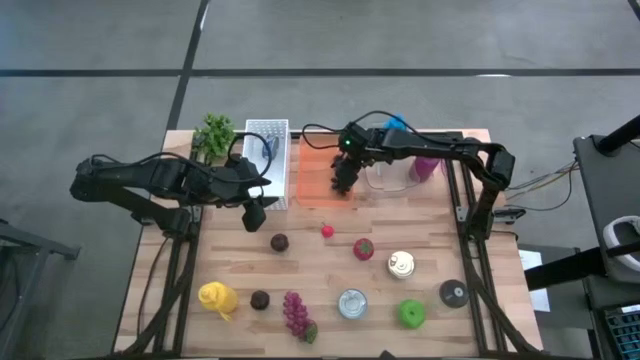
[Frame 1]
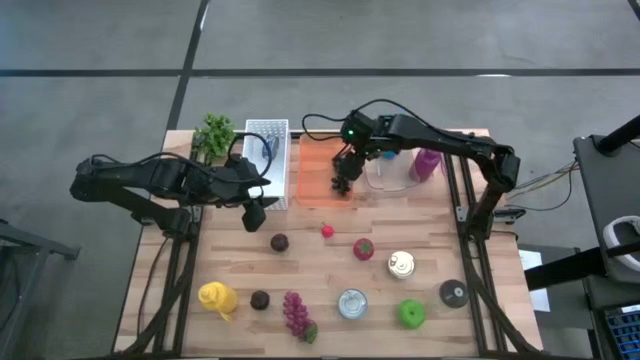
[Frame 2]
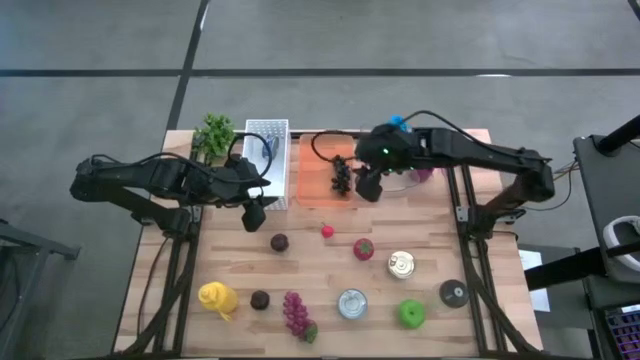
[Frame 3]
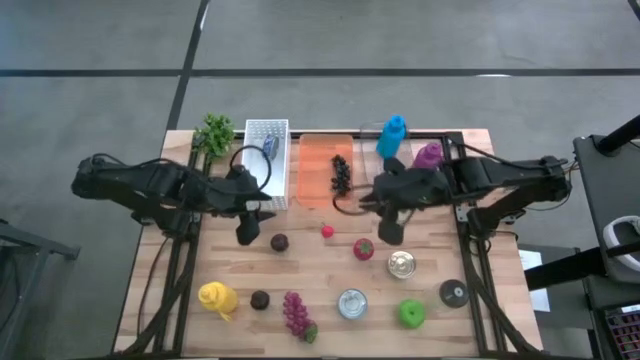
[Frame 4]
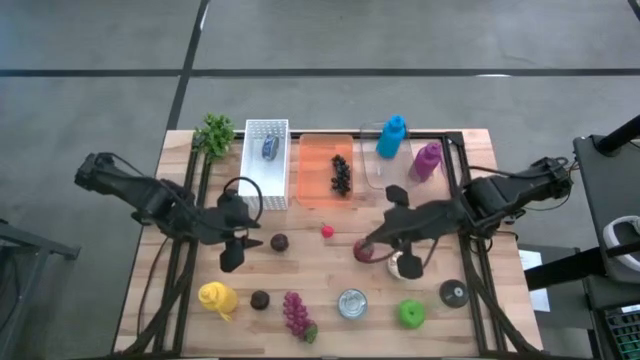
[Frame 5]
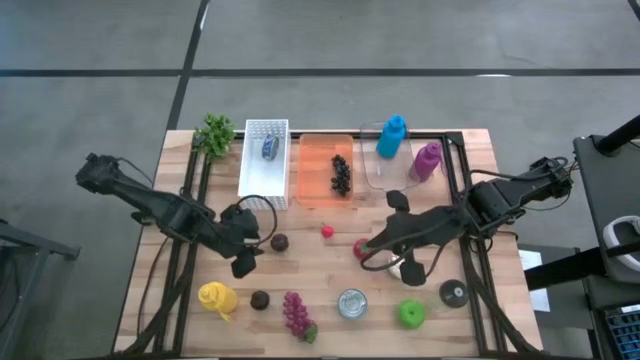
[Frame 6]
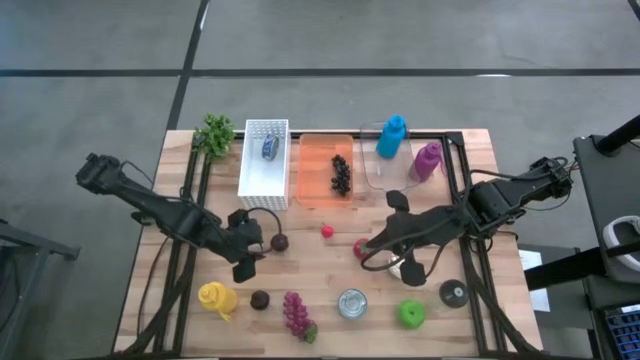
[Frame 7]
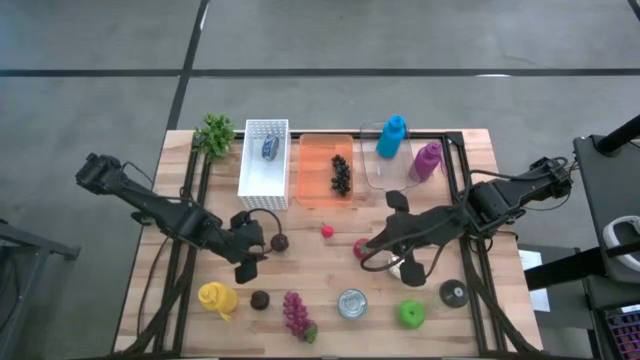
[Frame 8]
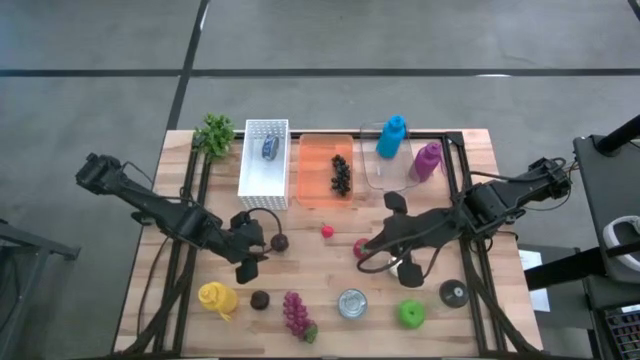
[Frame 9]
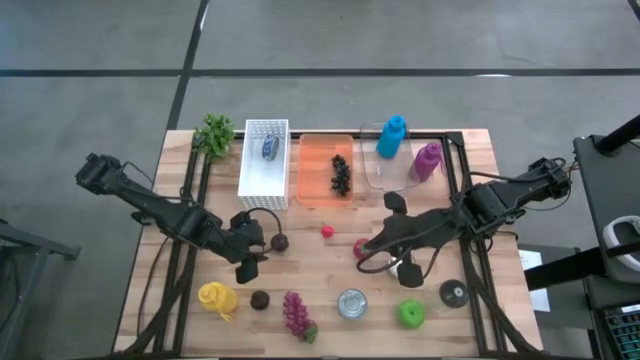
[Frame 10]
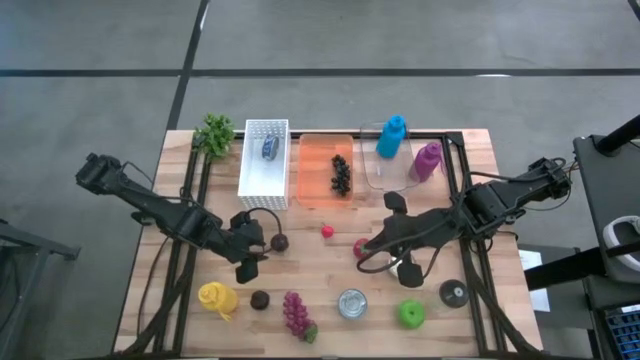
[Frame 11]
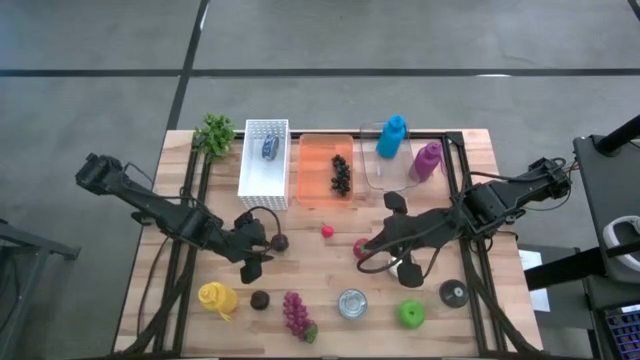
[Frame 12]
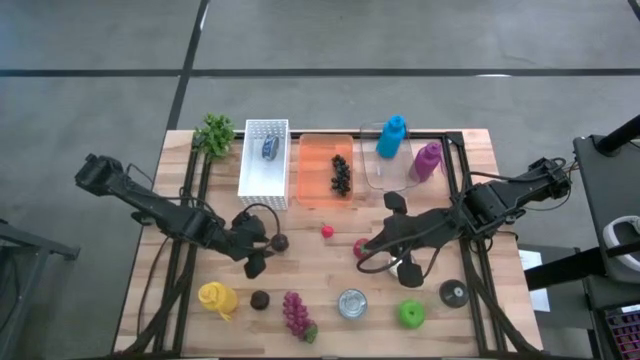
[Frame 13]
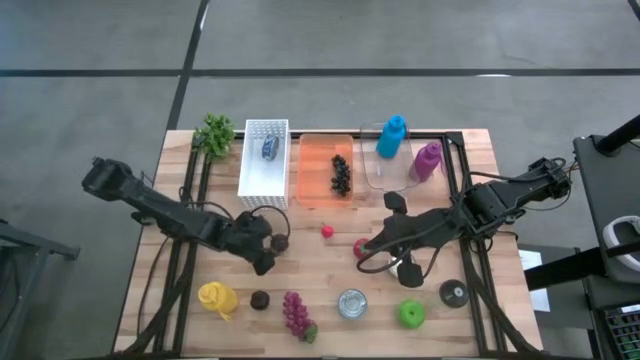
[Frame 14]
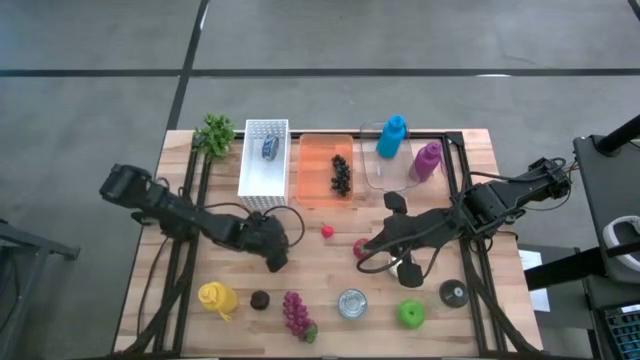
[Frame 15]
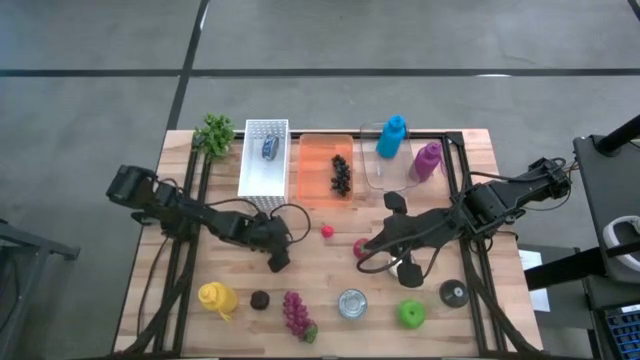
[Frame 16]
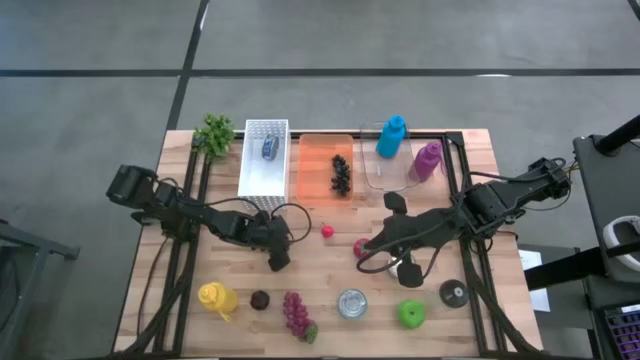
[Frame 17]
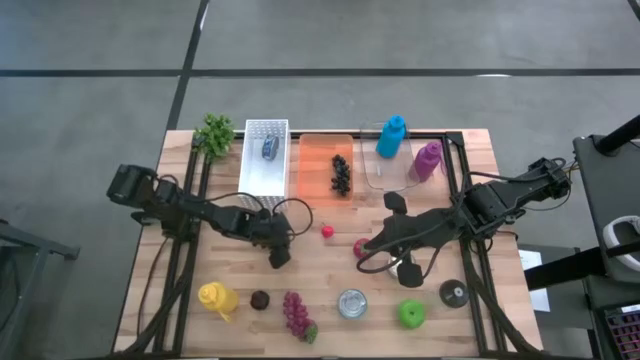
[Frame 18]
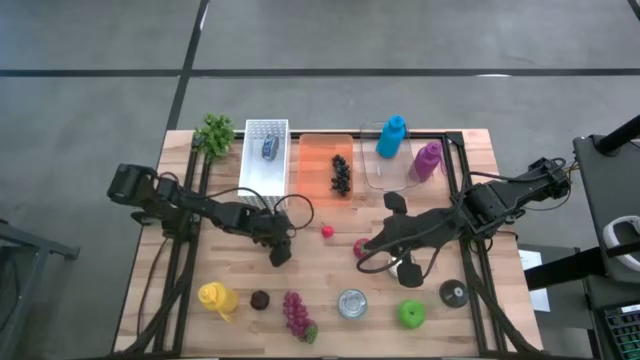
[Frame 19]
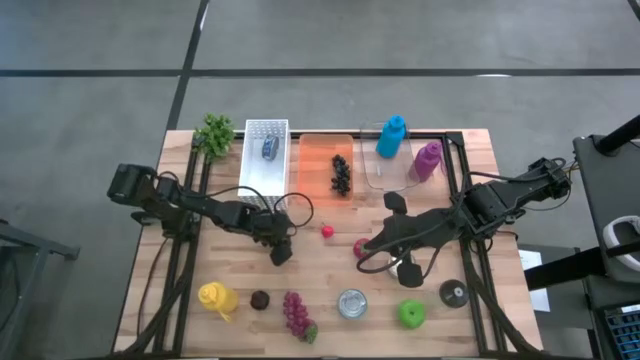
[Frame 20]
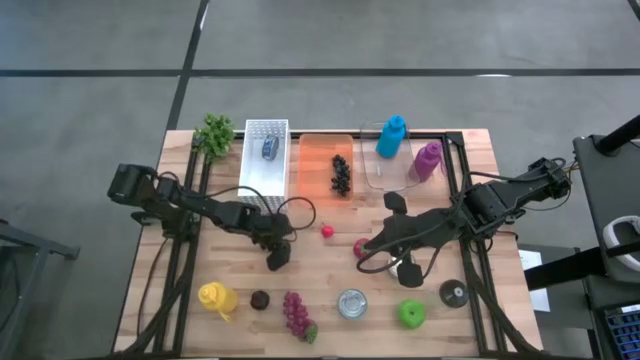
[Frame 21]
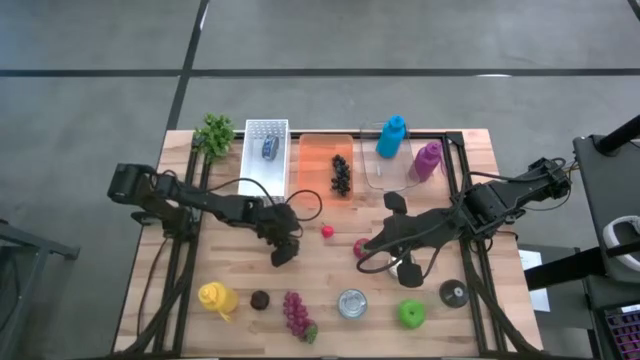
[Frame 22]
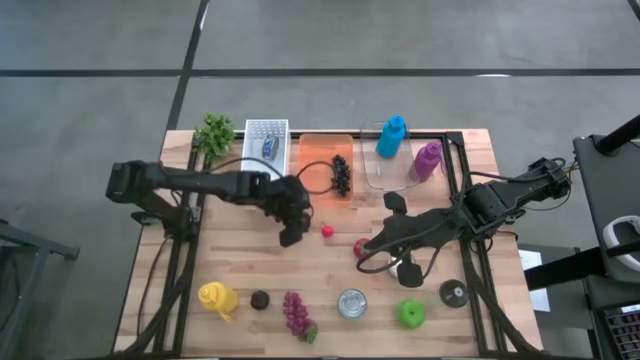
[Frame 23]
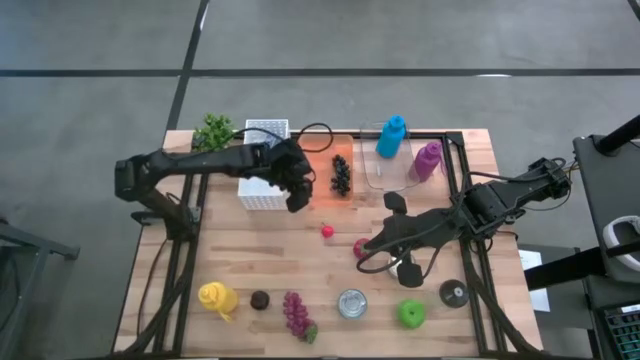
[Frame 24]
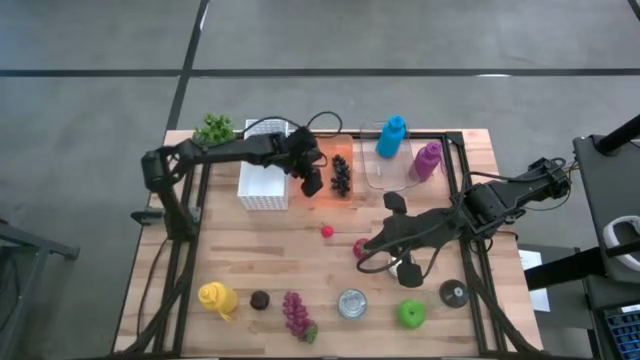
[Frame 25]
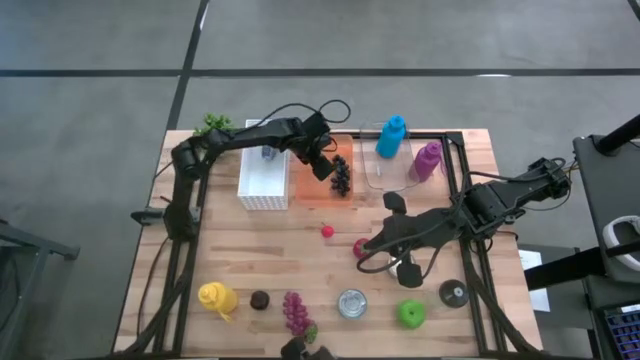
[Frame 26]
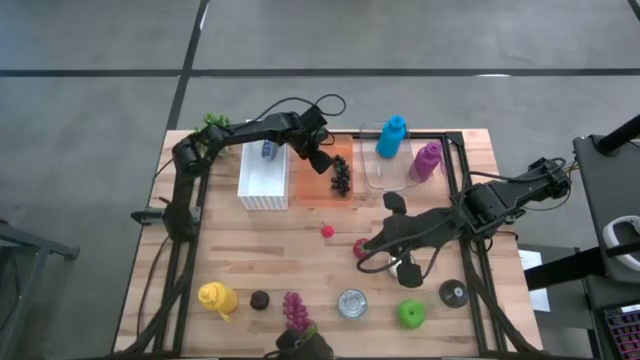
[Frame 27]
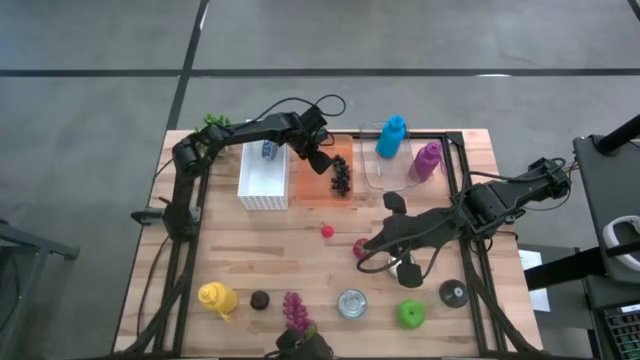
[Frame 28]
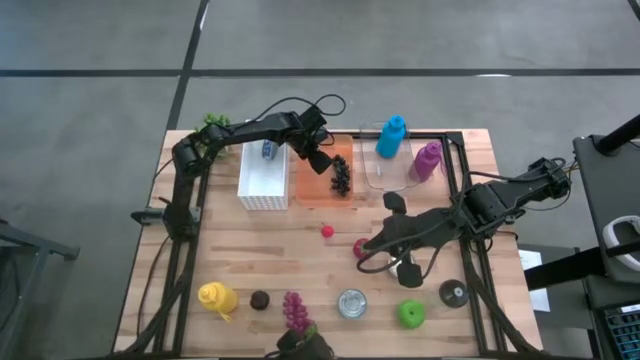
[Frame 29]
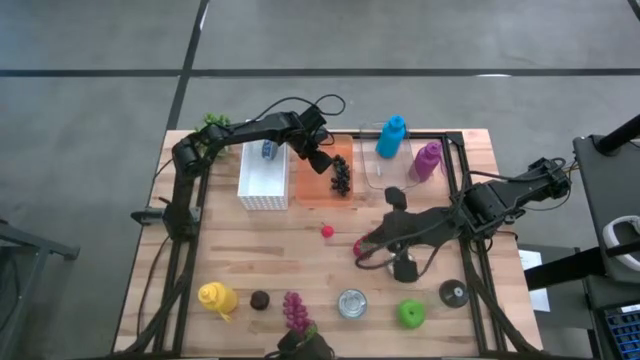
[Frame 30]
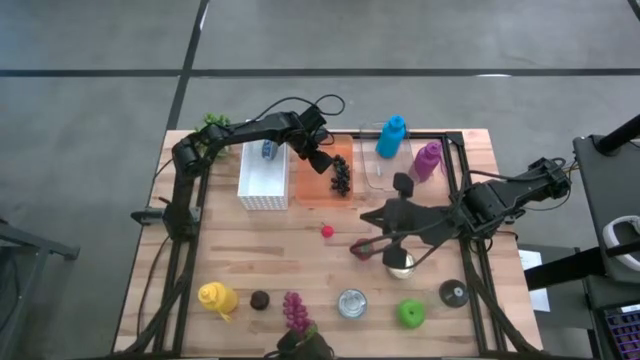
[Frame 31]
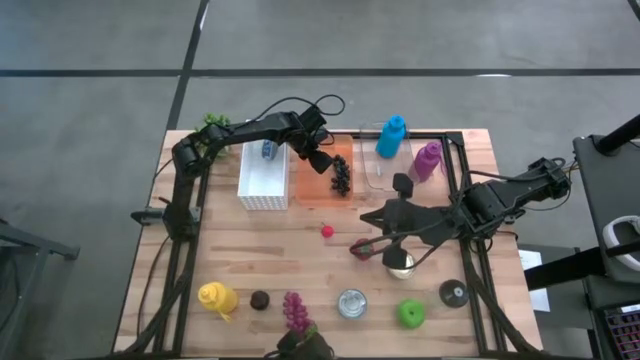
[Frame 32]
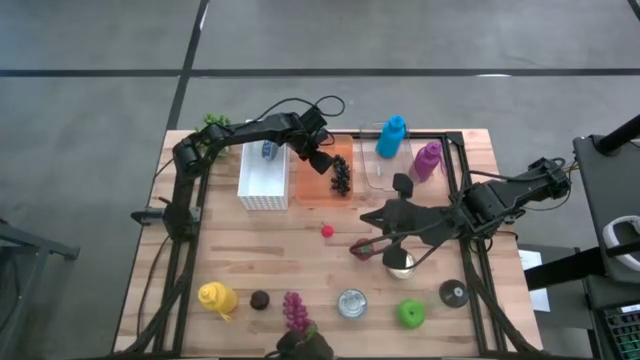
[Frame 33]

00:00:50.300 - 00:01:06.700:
Task: Pick & Place Food Item
Put the top plum into the orange bin

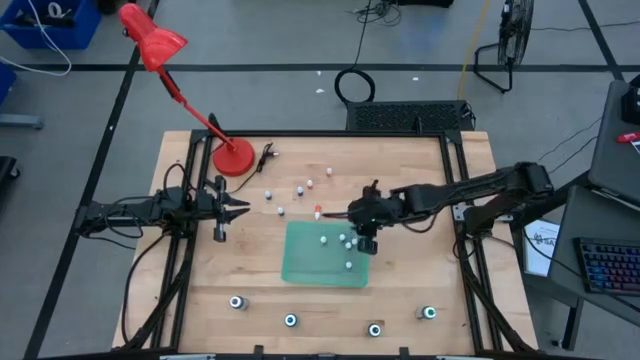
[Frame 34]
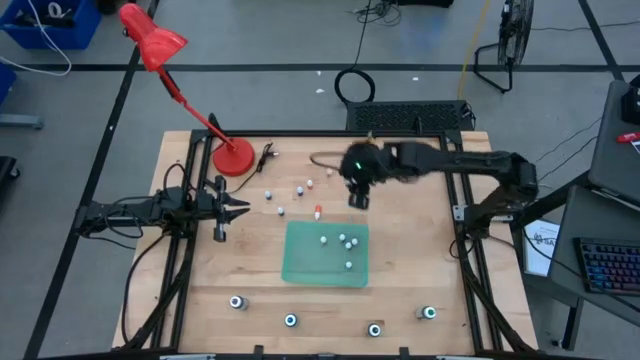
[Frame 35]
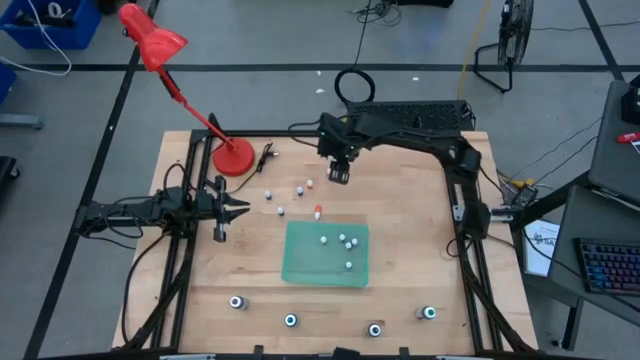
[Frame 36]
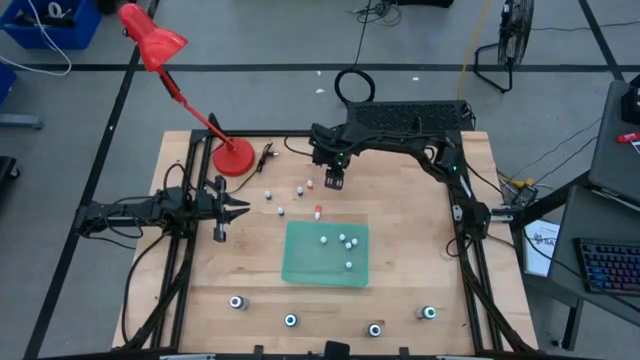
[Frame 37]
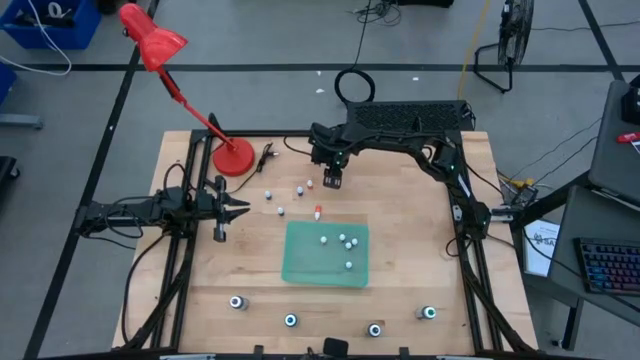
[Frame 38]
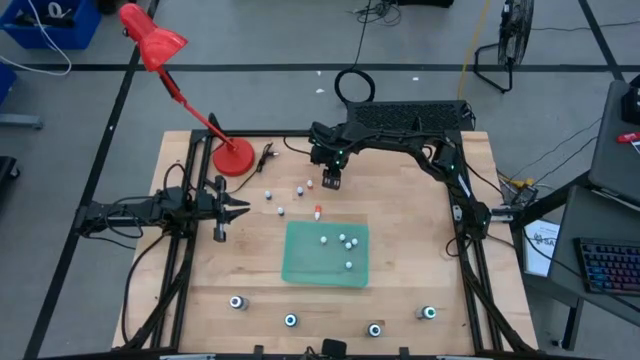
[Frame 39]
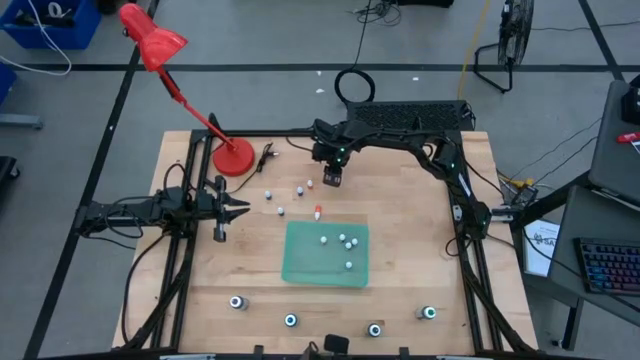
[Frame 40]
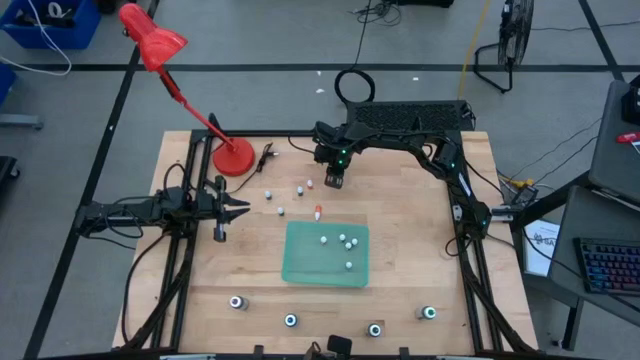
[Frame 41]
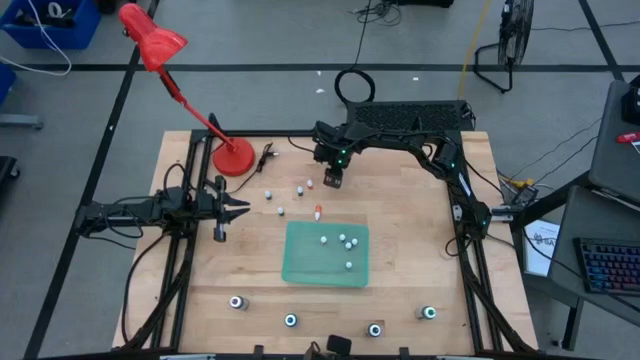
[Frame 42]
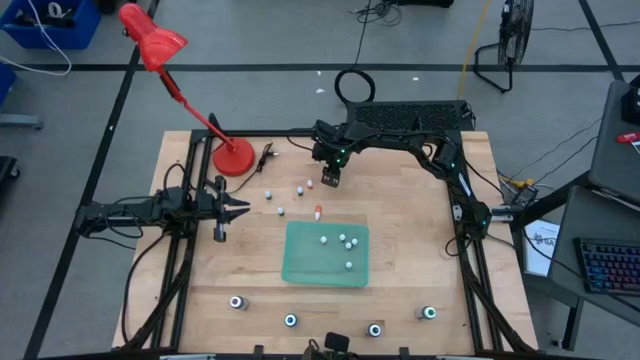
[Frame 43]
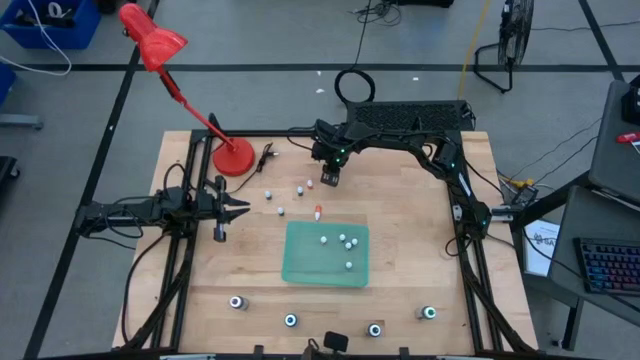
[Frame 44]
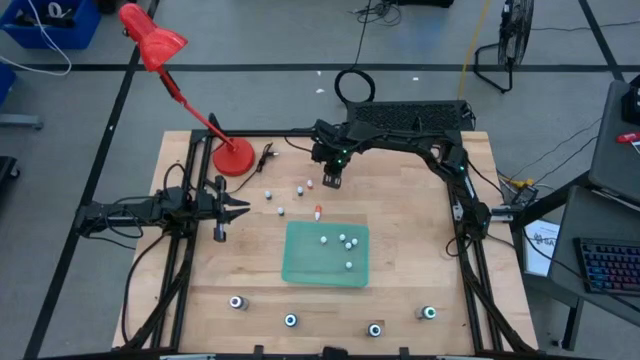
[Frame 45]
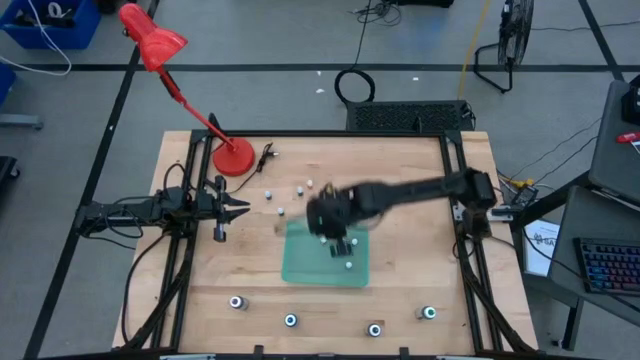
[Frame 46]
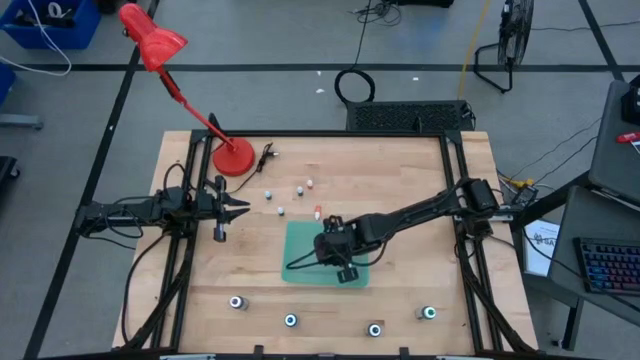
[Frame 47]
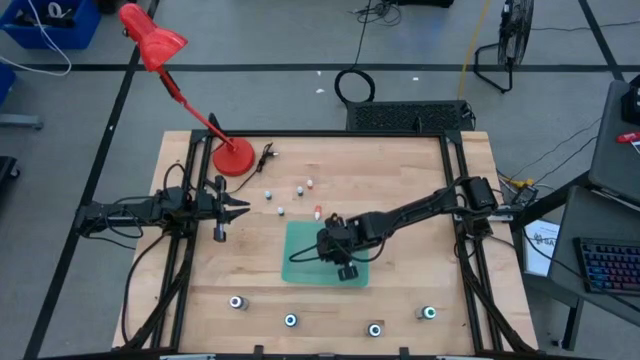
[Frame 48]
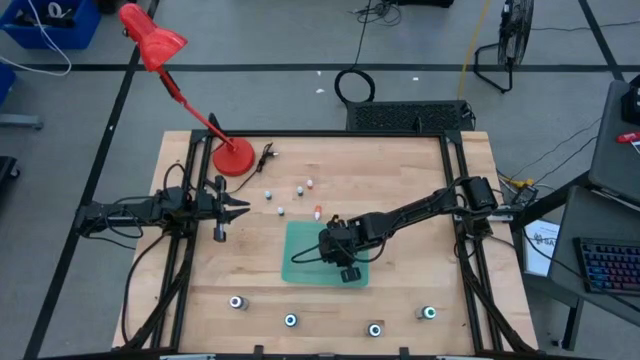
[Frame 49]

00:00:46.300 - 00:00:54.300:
Task: Pick & Place food coloring
Put the small orange food coloring bottle into the green bin
